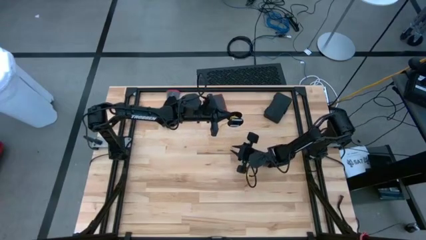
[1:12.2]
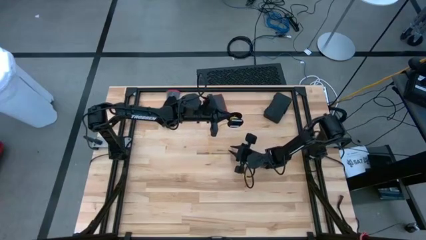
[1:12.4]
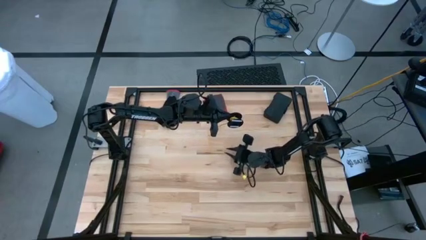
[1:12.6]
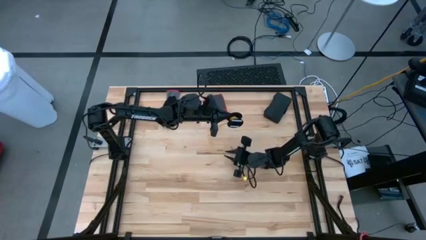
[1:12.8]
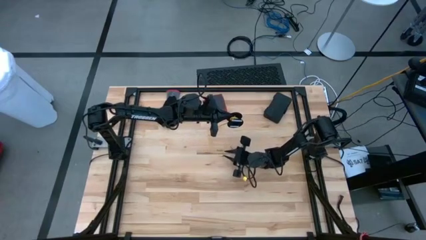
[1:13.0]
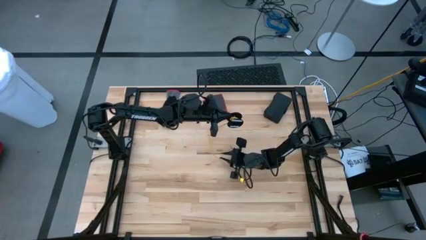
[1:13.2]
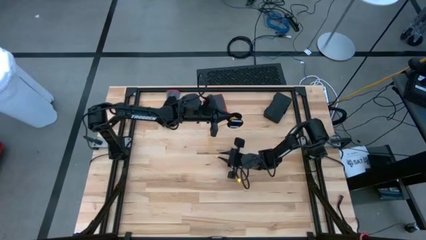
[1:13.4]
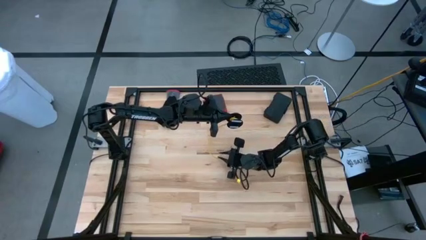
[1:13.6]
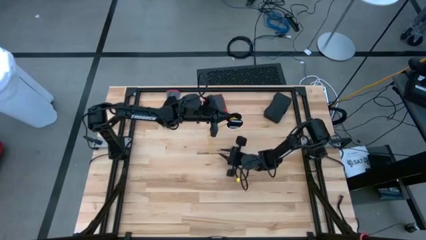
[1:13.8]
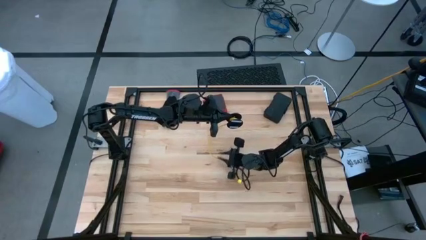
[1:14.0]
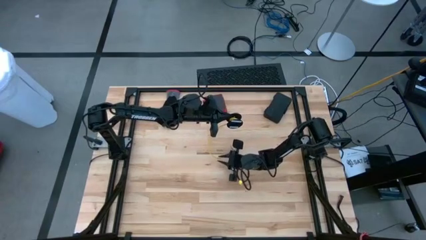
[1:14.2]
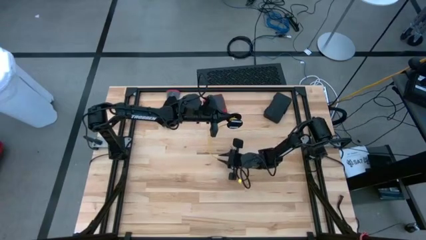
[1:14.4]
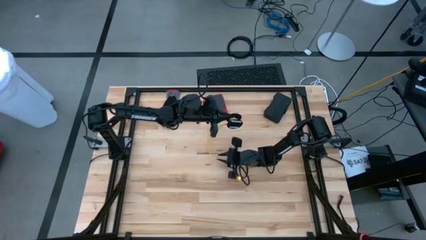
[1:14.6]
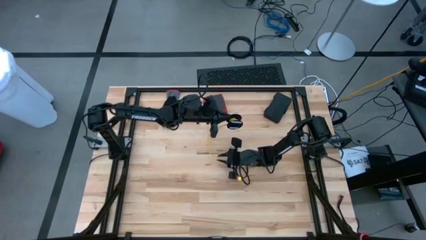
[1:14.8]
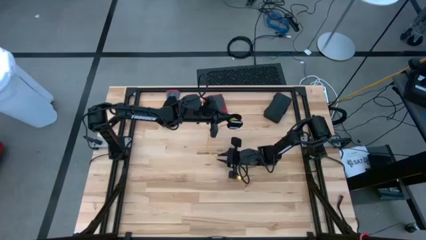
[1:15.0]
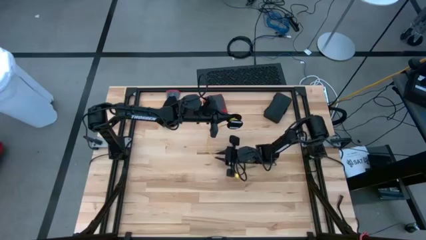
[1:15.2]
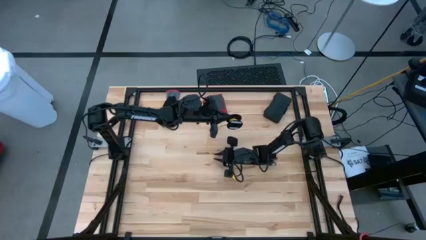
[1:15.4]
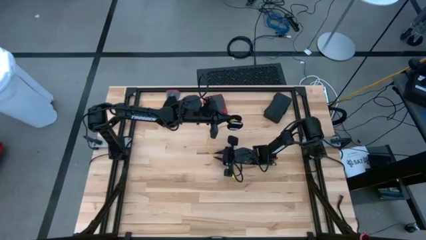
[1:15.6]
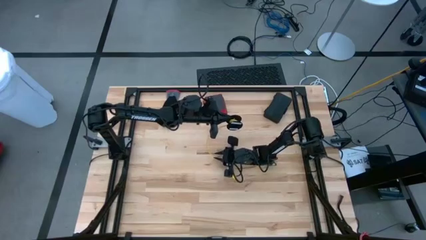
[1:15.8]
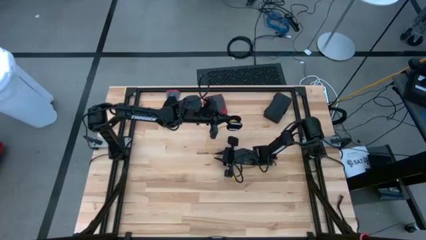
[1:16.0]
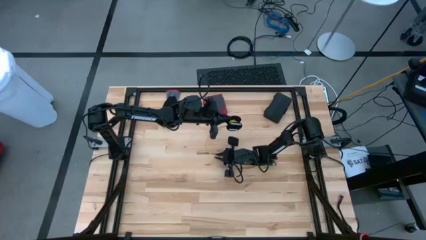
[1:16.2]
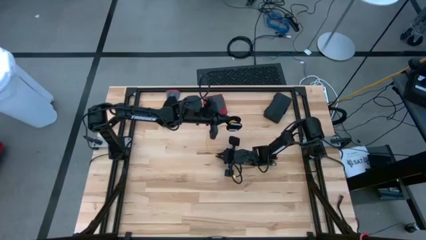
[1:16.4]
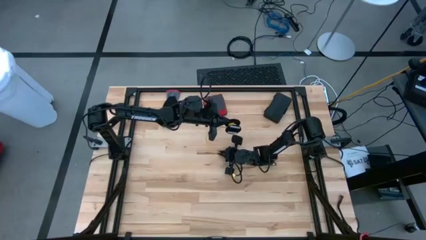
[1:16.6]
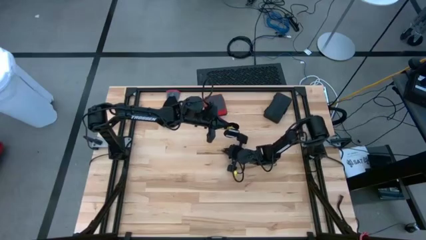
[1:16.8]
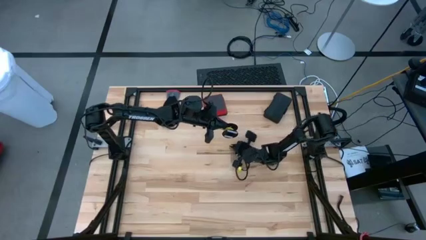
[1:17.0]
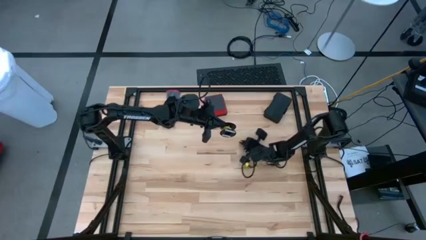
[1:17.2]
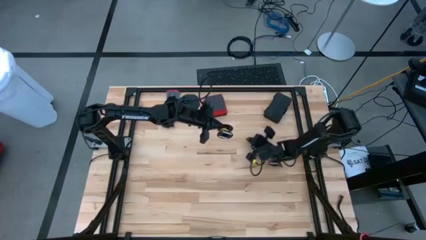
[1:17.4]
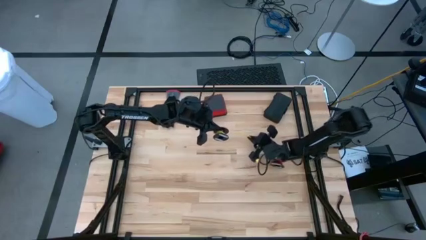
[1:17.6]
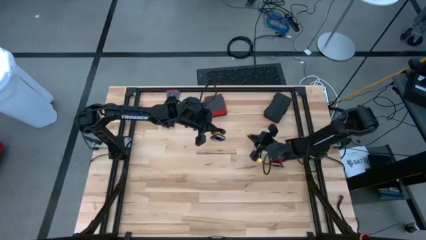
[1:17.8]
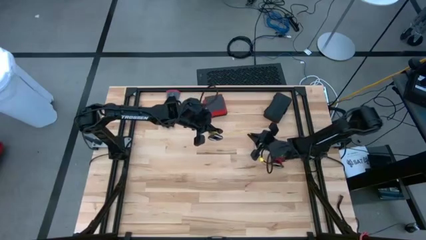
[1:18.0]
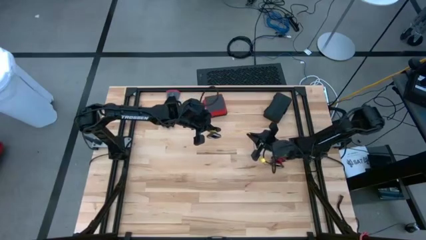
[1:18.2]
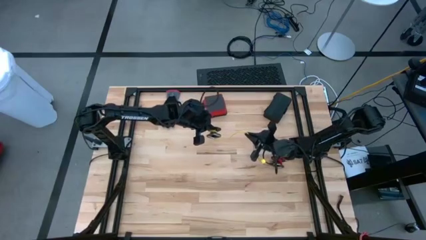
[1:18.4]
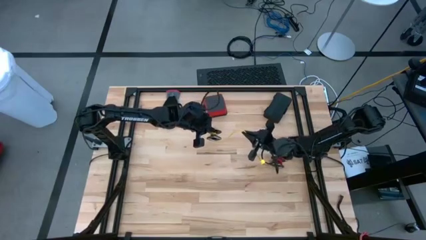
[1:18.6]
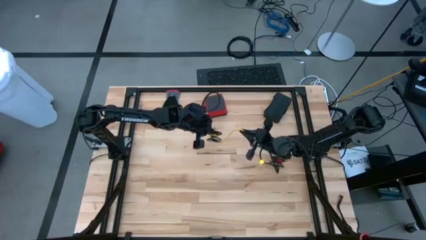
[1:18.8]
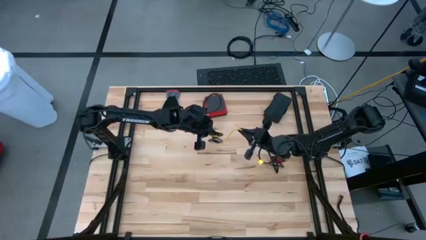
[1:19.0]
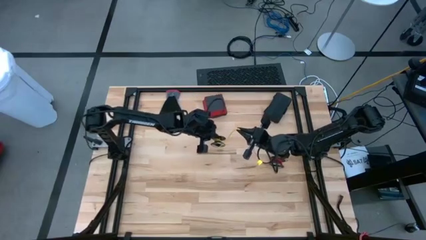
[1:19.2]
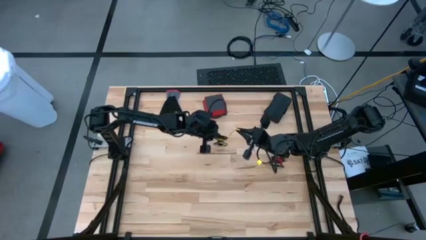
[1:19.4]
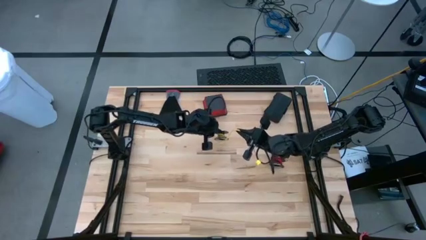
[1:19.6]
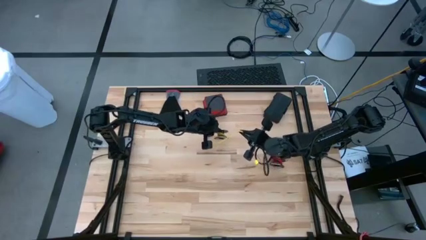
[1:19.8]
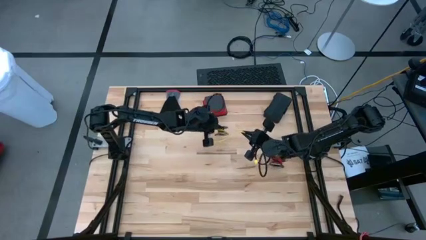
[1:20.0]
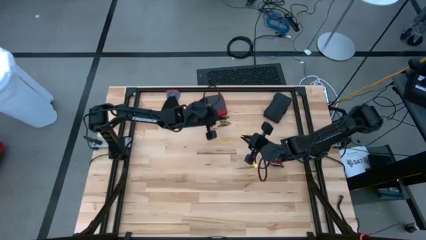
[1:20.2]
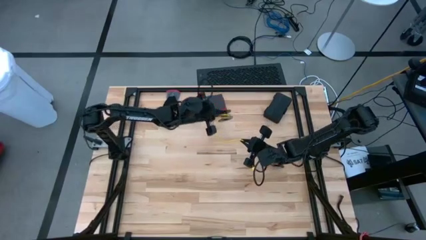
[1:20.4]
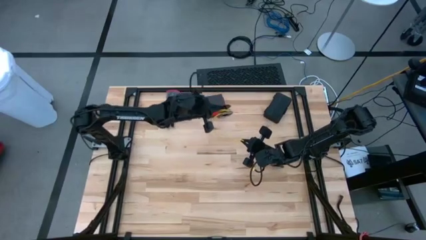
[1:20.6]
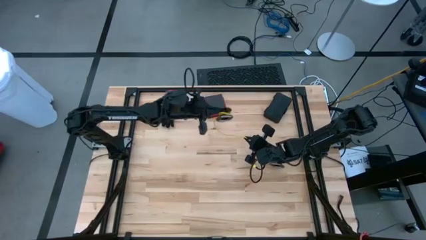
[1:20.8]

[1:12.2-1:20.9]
Task: Coil cords
Coil the yellow wire onto the spool

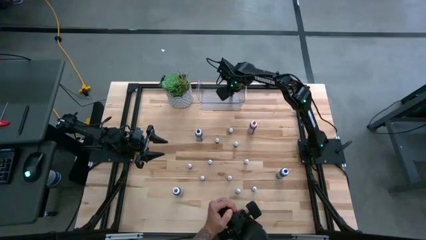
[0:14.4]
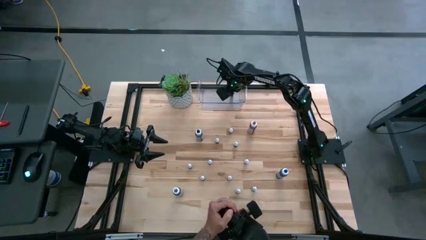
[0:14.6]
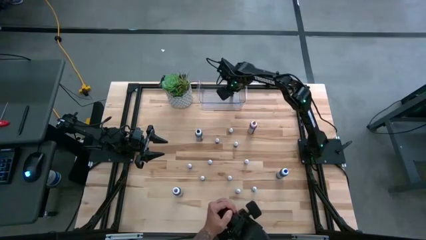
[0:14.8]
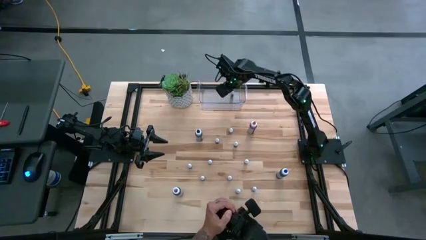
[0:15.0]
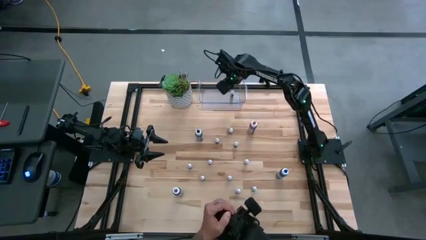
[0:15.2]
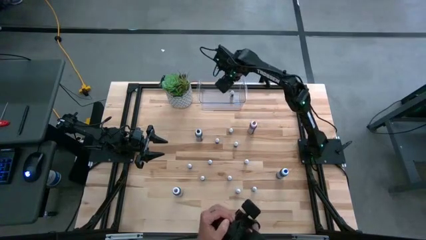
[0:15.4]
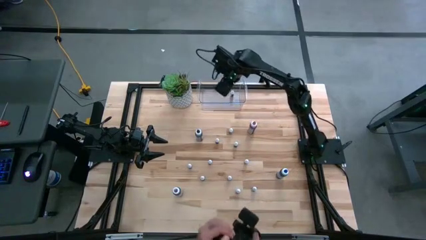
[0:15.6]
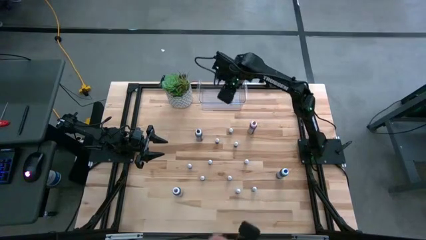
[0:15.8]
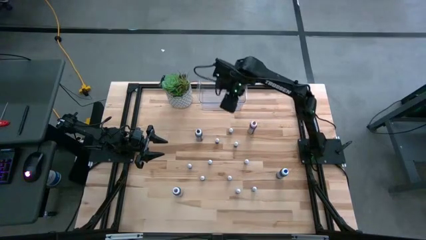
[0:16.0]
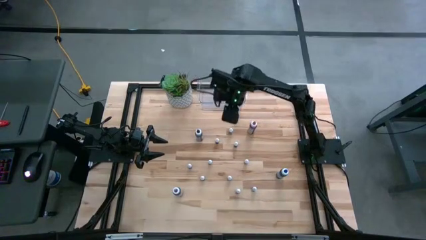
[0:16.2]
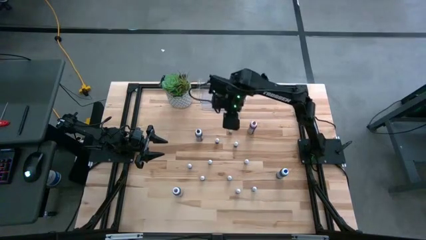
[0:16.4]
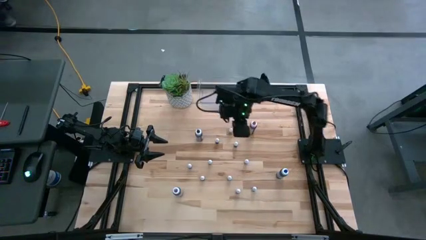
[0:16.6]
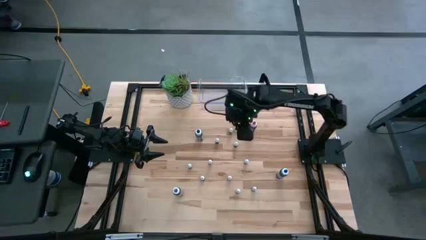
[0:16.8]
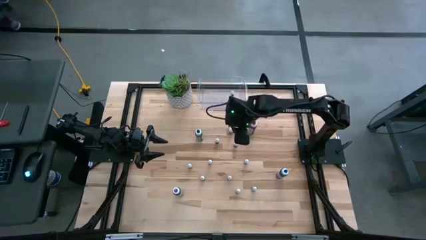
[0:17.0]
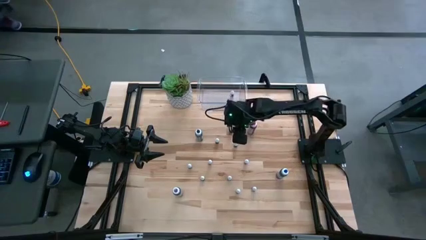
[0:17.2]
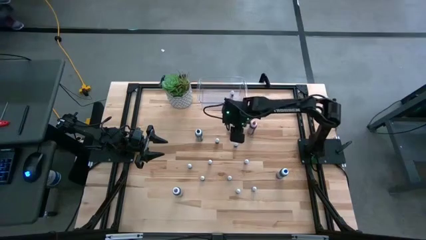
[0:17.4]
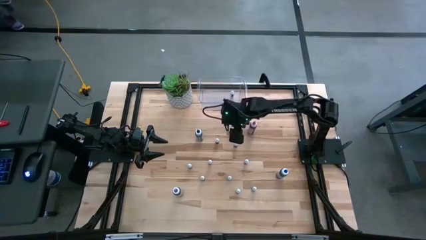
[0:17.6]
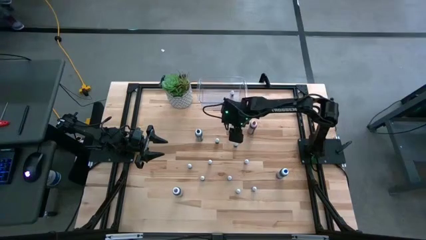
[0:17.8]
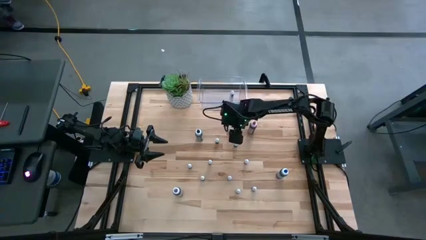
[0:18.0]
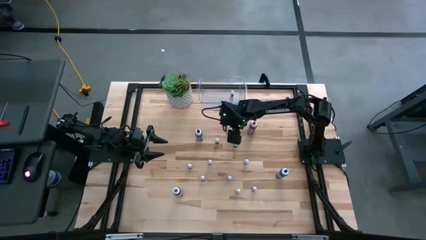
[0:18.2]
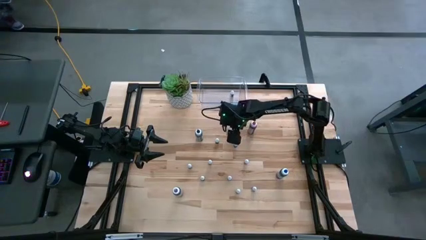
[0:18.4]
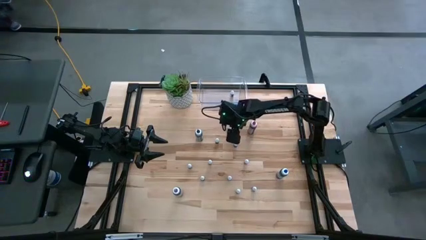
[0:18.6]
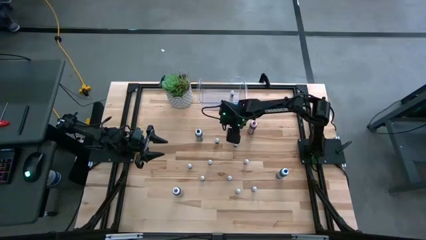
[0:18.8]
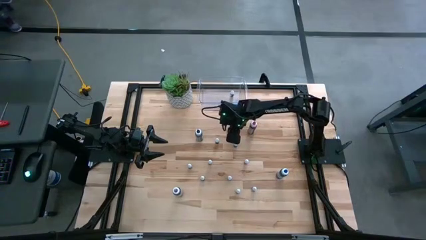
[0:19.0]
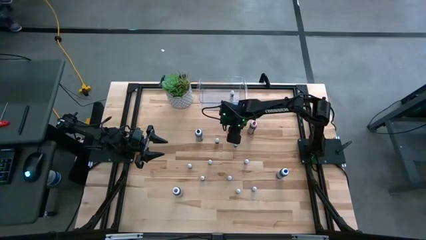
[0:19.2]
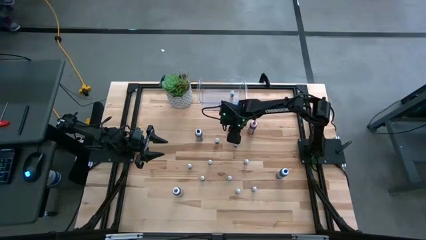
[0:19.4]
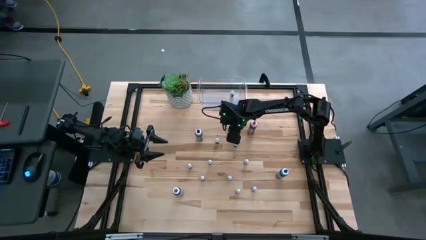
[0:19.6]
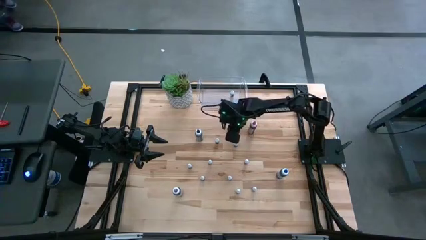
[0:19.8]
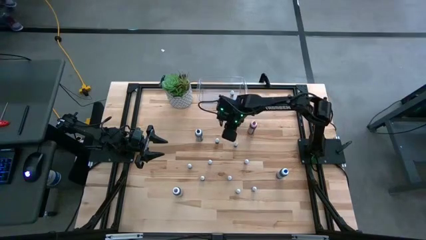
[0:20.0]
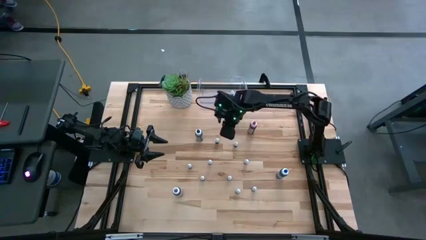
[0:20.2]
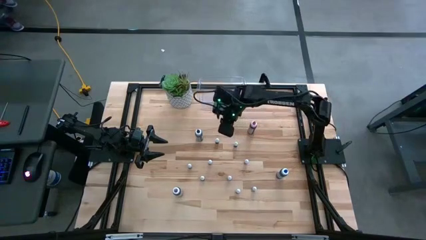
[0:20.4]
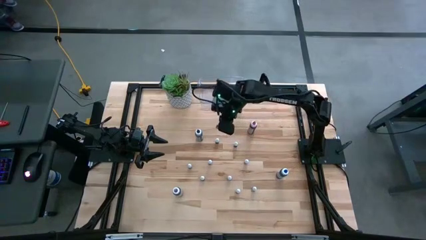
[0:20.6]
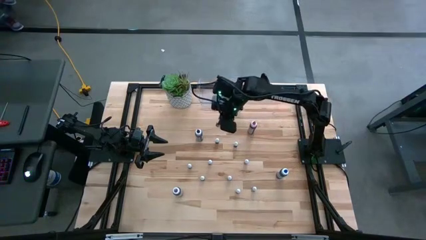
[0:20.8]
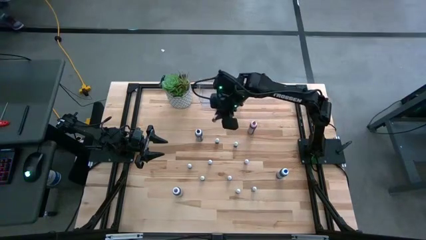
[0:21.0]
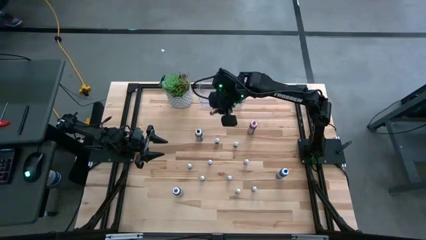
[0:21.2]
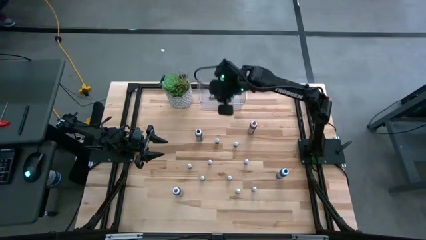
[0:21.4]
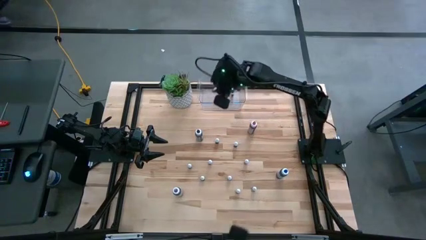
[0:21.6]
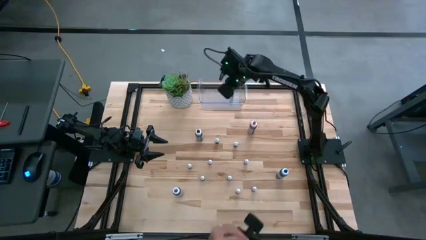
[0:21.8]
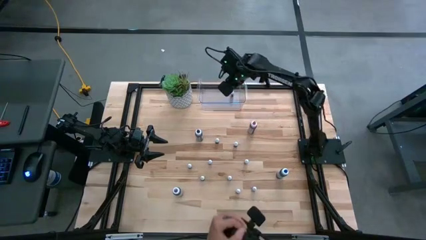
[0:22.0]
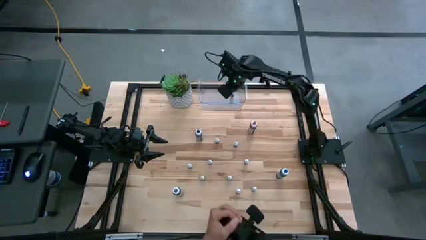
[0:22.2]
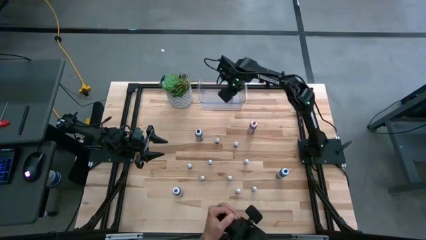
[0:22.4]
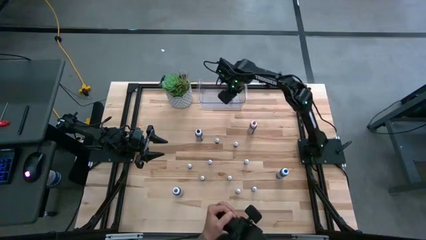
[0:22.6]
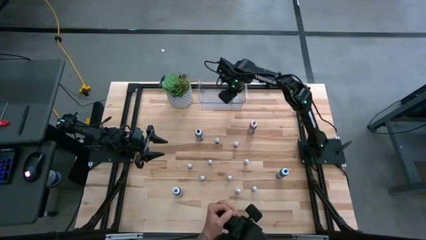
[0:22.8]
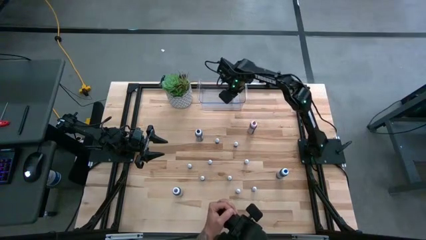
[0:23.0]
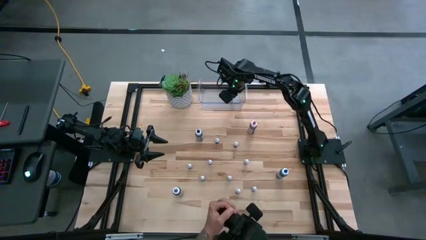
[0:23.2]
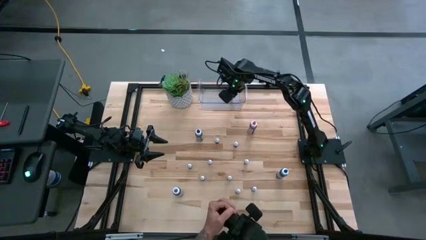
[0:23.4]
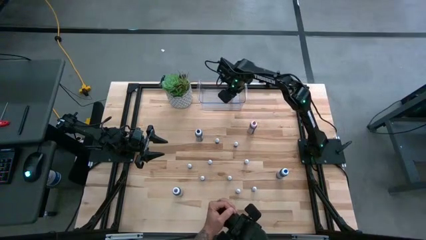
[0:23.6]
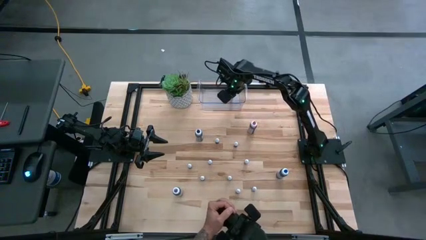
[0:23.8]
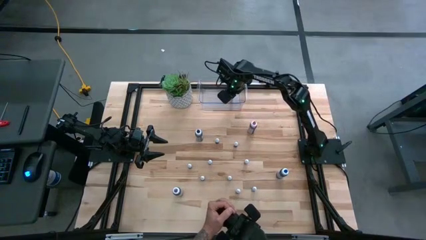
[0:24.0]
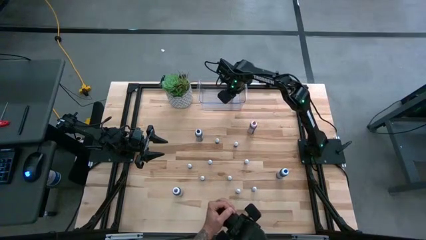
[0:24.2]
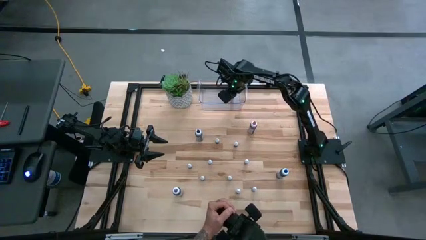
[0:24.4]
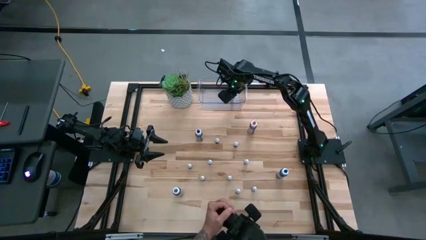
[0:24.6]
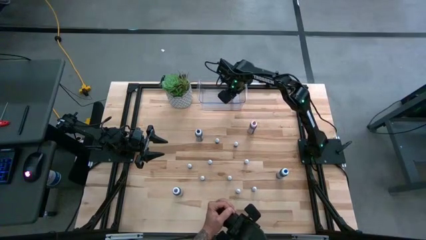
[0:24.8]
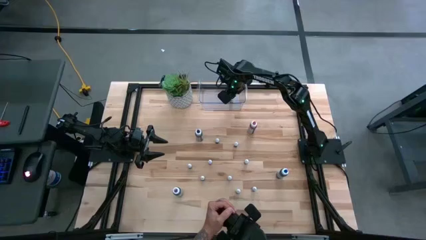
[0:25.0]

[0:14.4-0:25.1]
Task: Pick & Place food coloring
Put the right small green food coloring bottle into the bin
